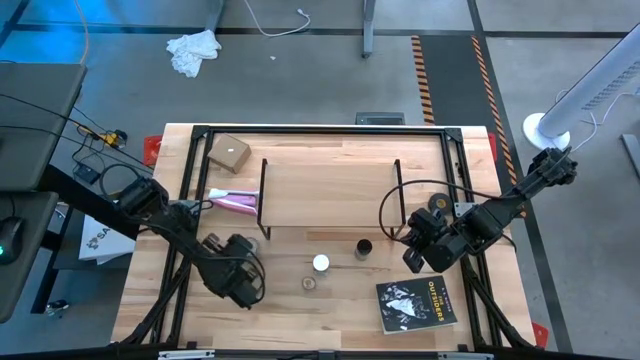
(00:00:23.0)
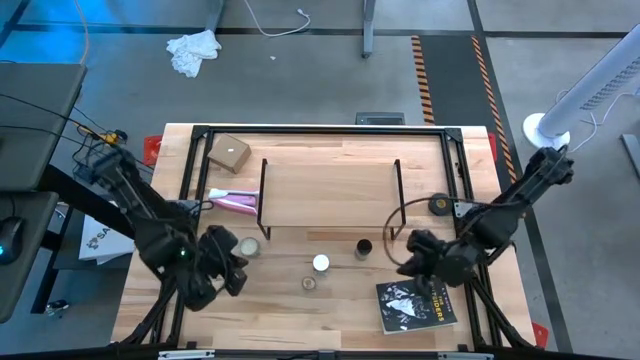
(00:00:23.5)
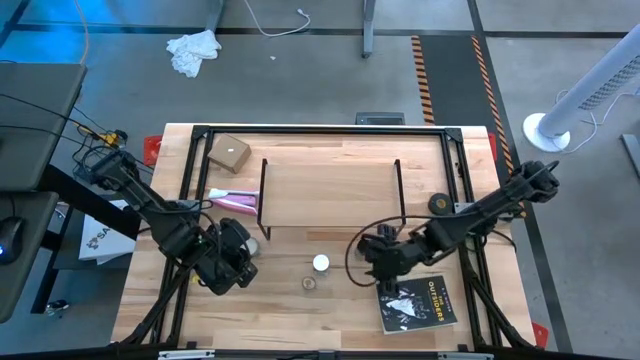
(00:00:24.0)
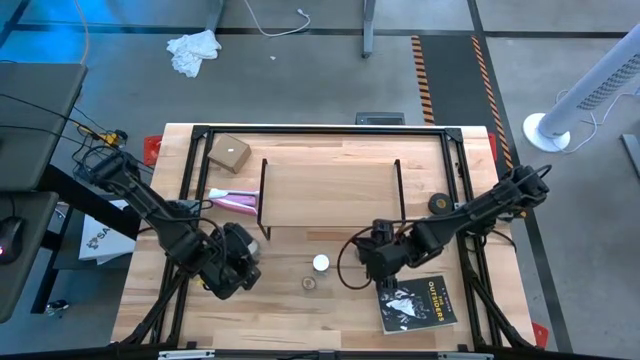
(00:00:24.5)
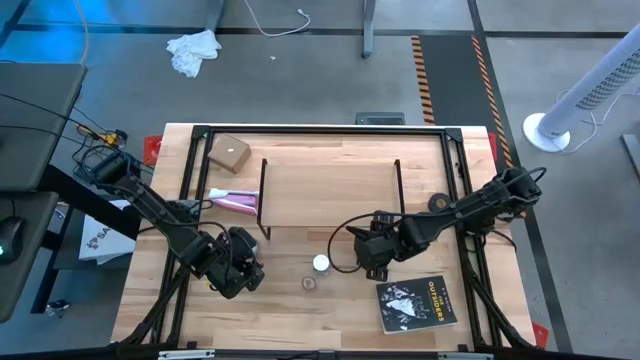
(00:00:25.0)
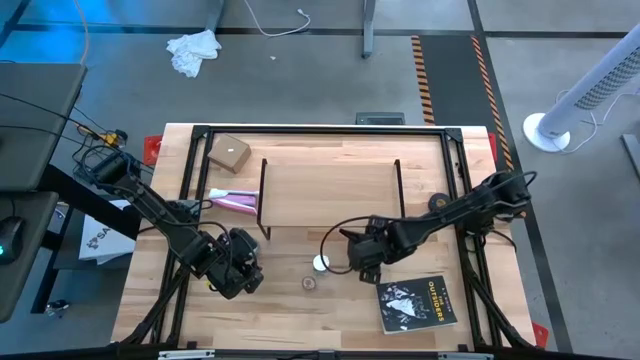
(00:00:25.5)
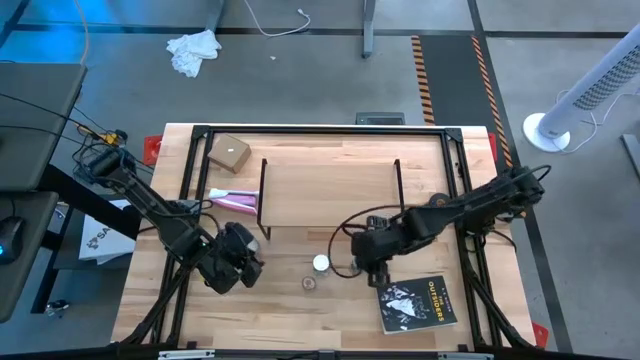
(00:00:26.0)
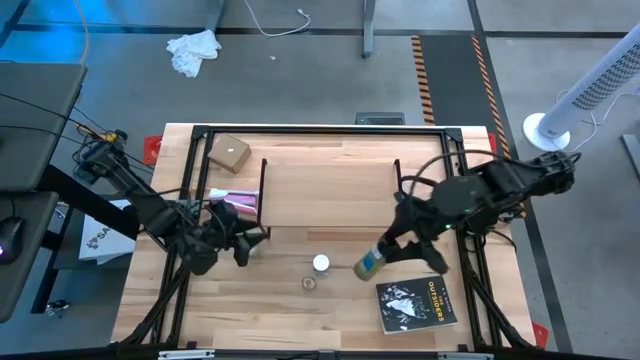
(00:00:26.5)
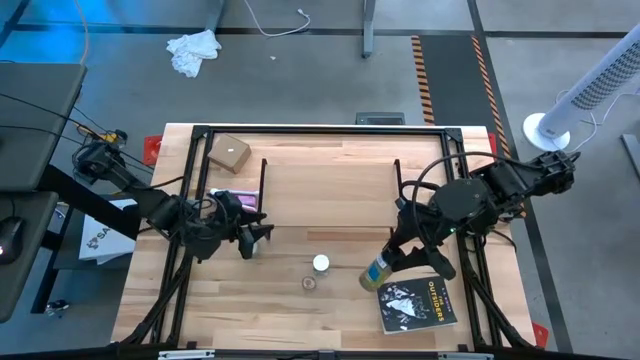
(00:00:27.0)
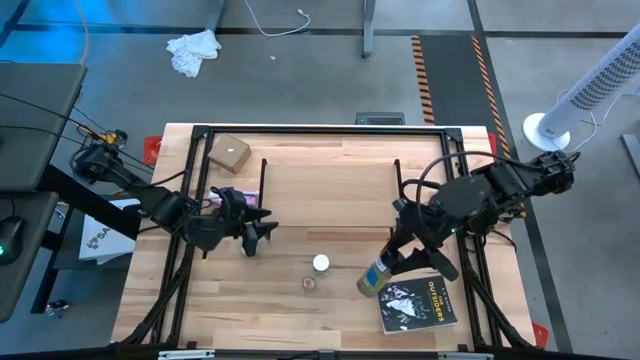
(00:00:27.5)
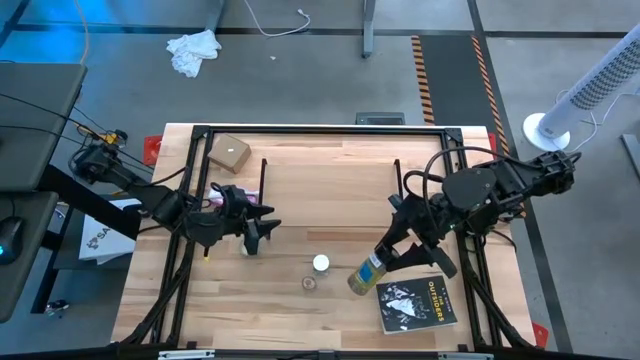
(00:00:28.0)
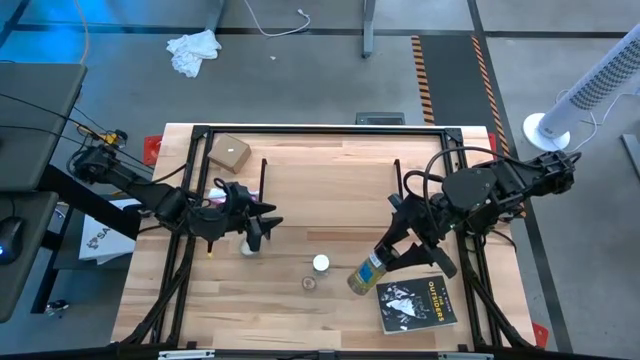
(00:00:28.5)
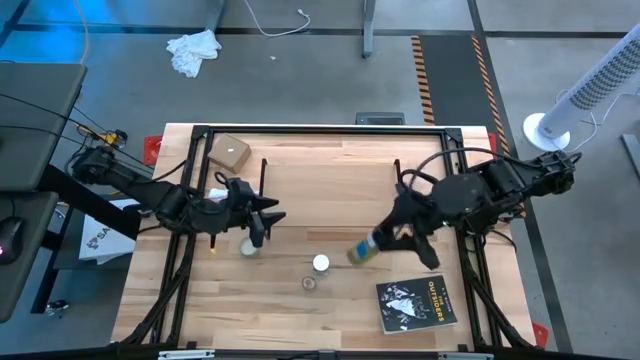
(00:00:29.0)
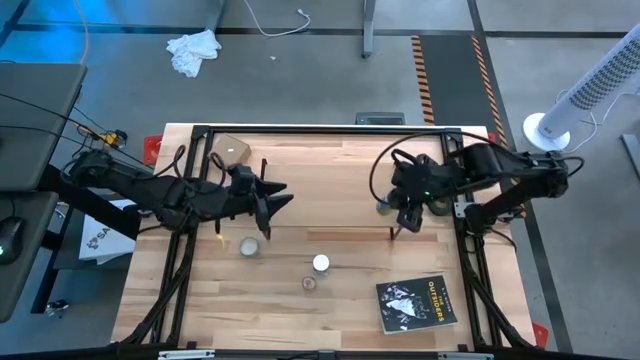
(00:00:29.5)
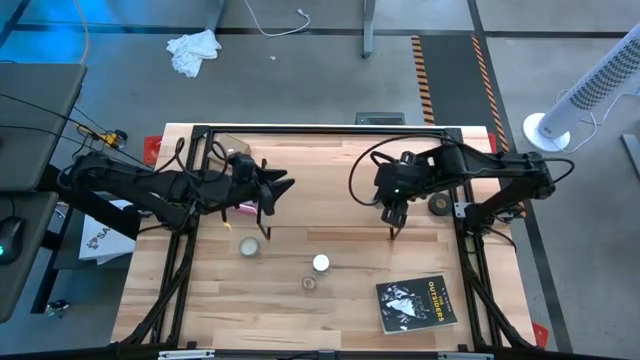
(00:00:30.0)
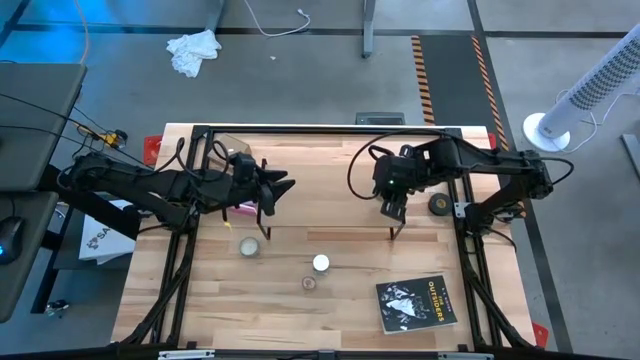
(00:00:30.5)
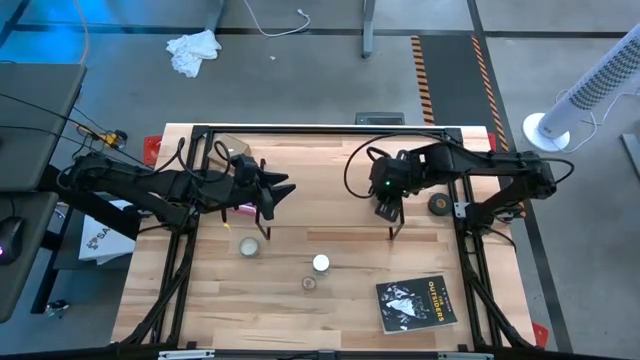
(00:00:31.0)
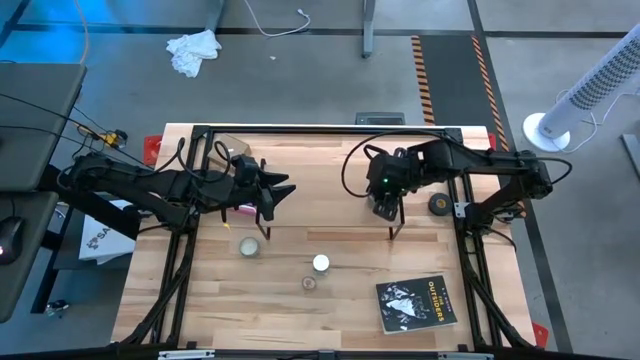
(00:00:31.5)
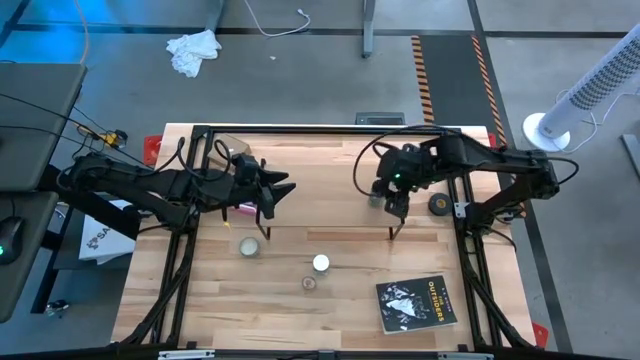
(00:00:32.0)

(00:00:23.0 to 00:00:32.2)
Task: Shelf spices
Put the light green seasoning bottle on the shelf

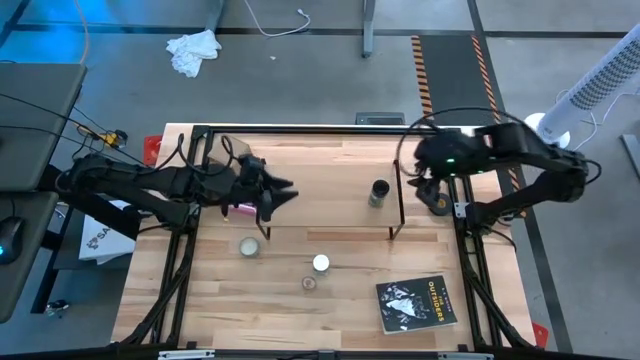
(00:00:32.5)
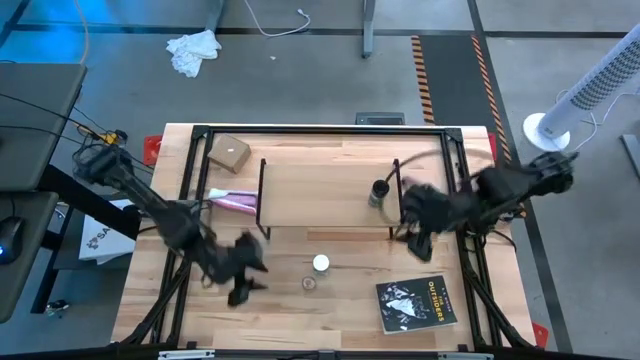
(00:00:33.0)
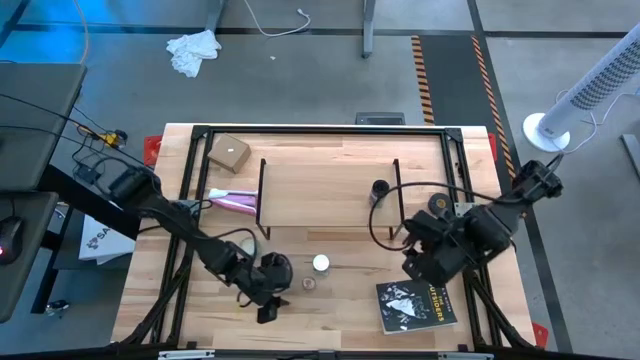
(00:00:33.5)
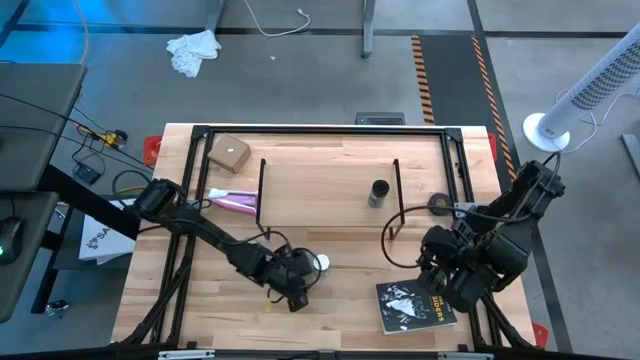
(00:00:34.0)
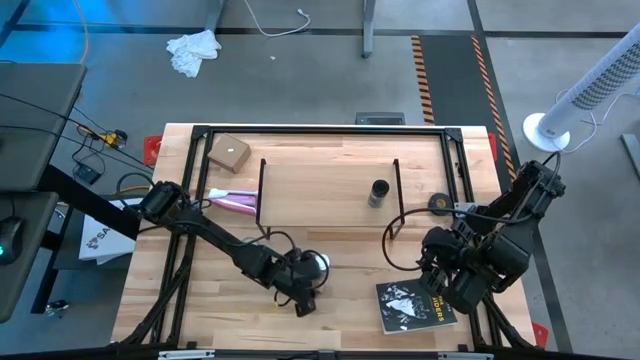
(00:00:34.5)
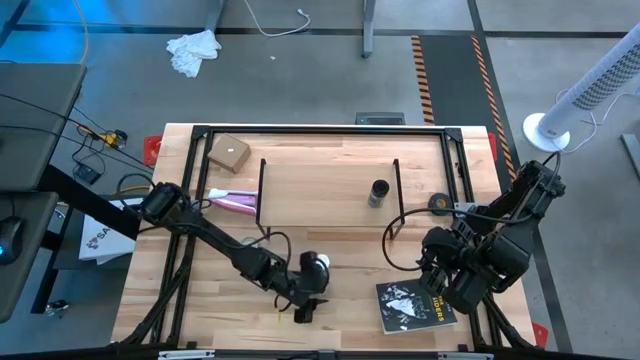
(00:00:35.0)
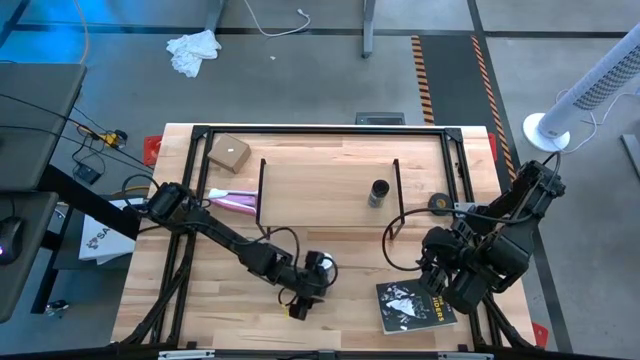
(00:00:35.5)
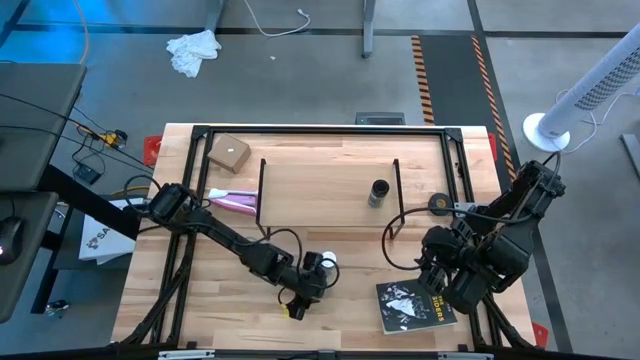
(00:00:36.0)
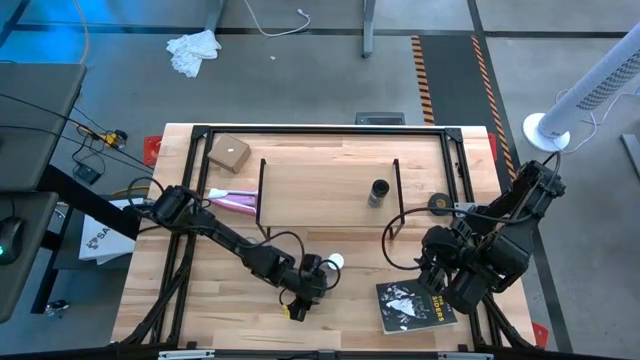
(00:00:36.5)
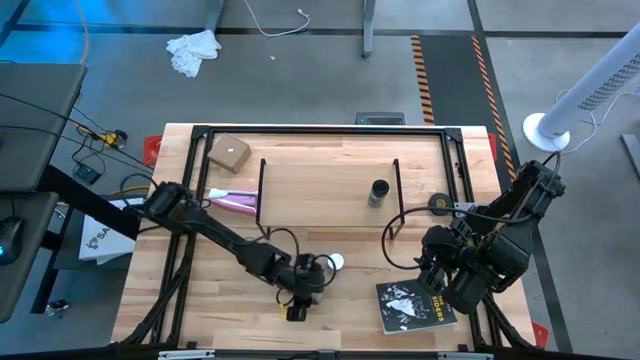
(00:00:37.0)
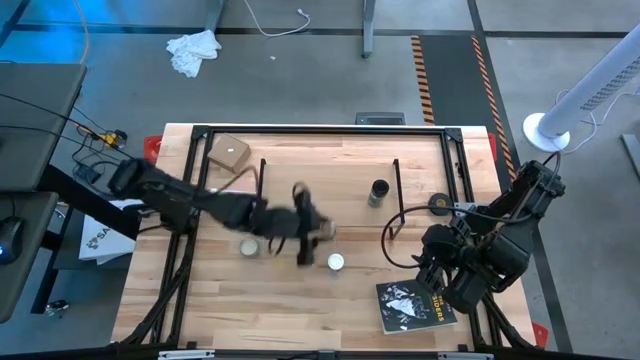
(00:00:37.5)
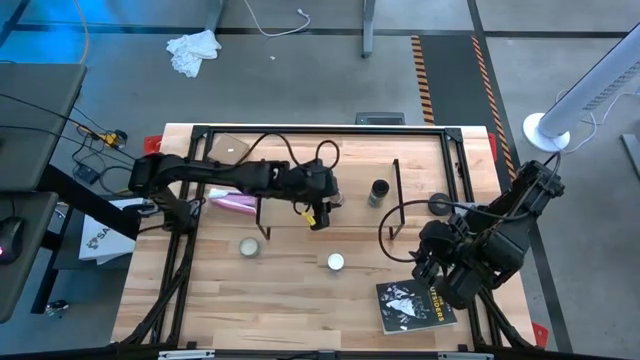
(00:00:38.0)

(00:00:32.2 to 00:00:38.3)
Put the brown seasoning bottle on the shelf

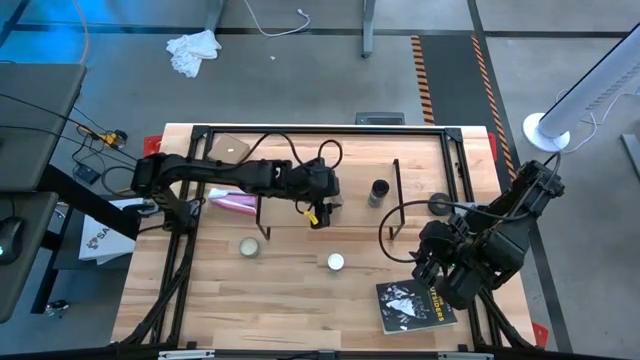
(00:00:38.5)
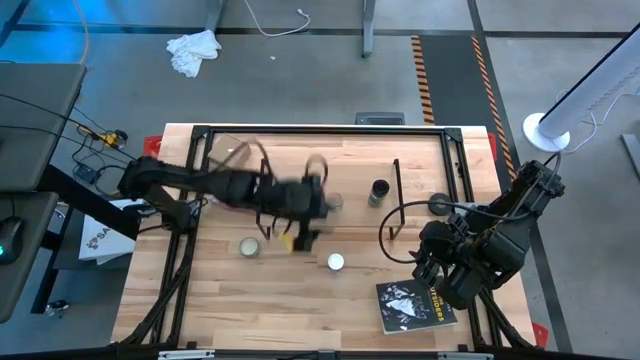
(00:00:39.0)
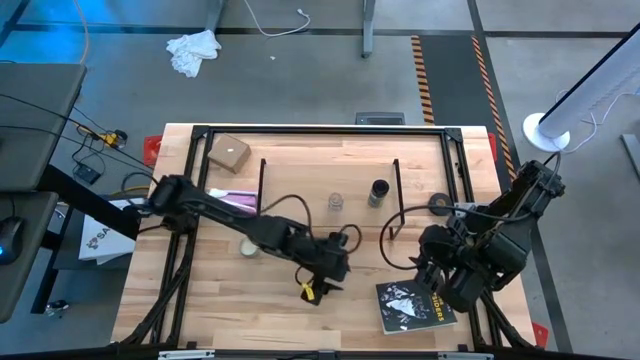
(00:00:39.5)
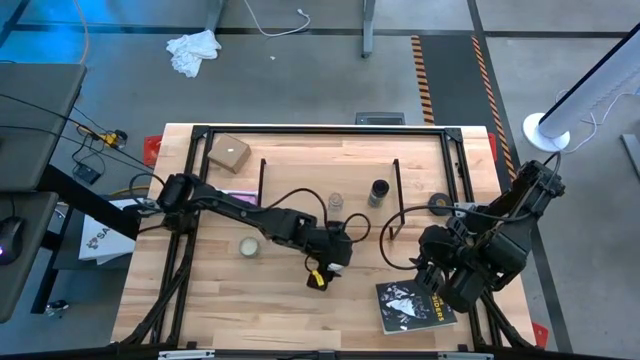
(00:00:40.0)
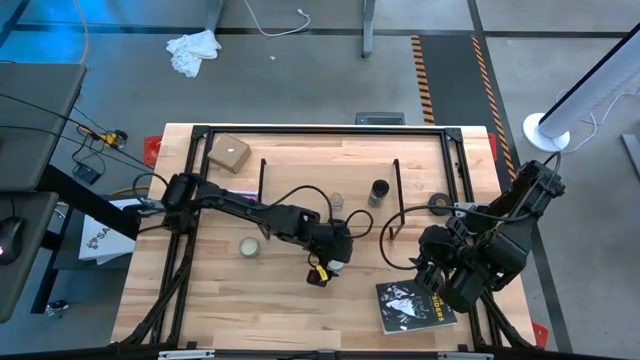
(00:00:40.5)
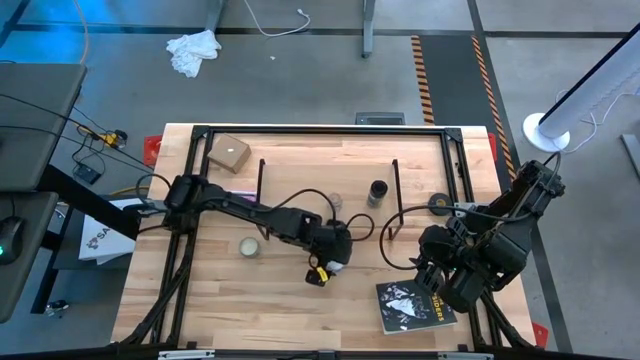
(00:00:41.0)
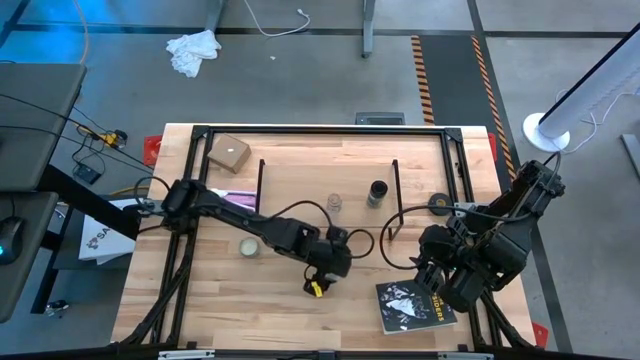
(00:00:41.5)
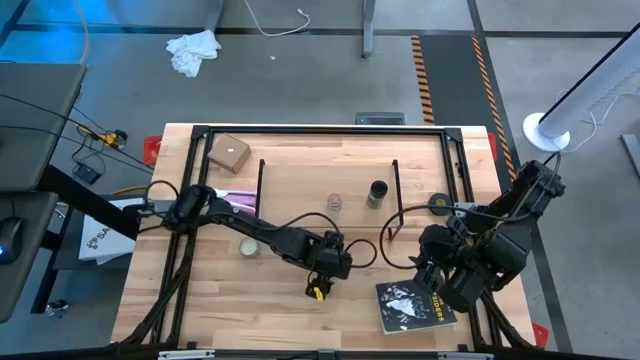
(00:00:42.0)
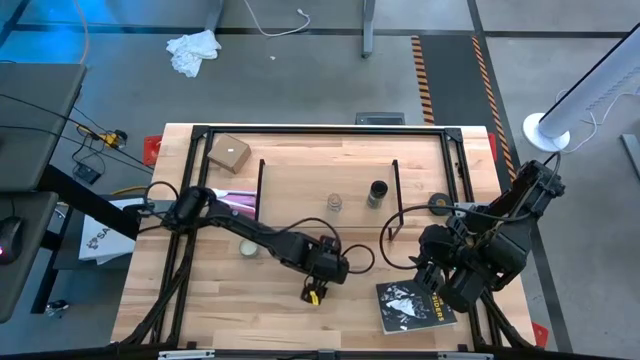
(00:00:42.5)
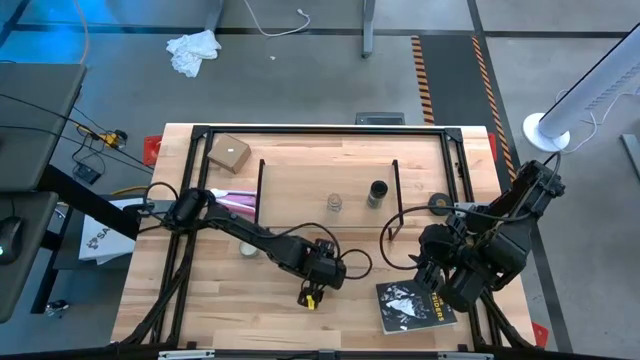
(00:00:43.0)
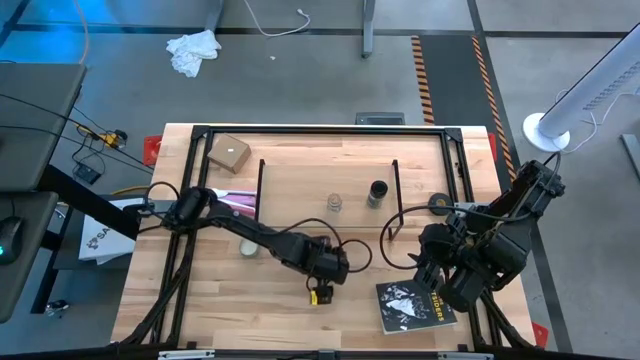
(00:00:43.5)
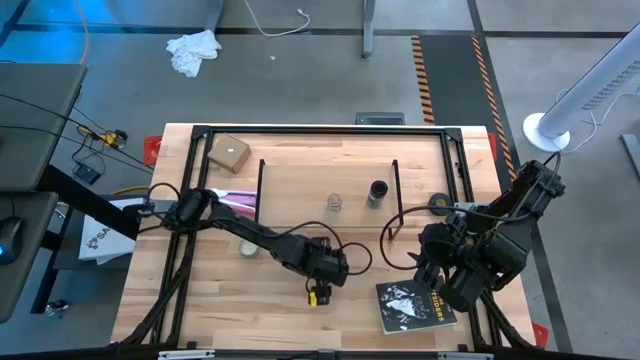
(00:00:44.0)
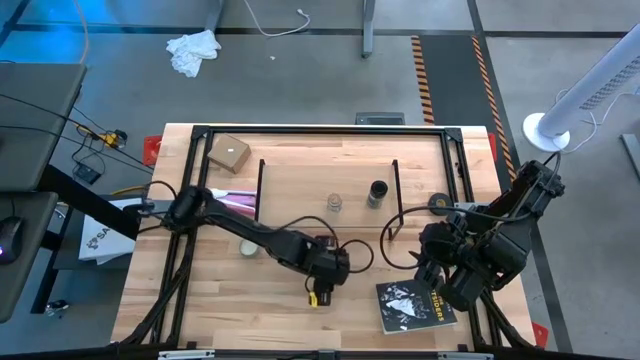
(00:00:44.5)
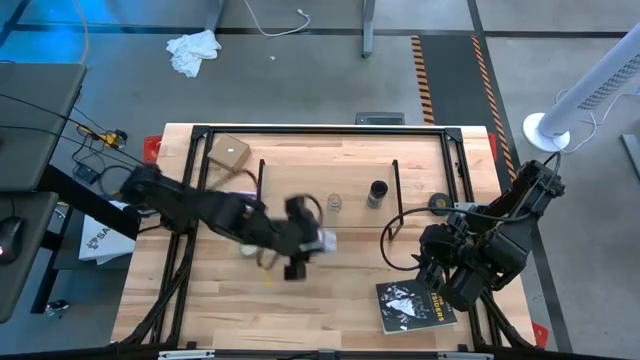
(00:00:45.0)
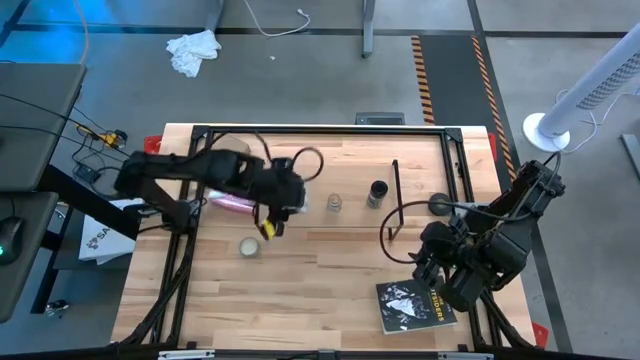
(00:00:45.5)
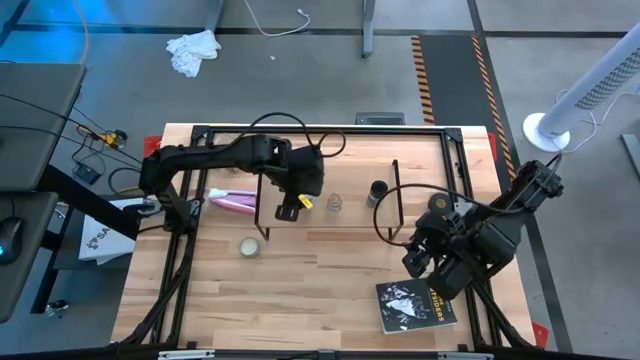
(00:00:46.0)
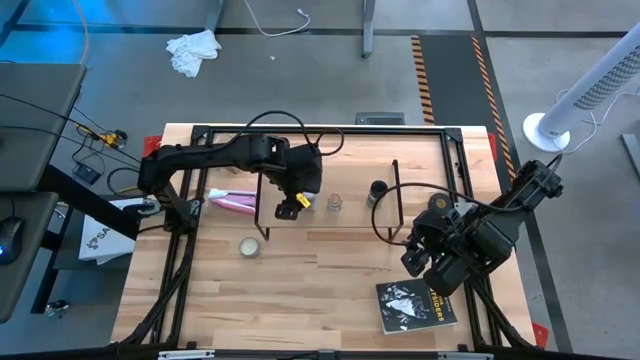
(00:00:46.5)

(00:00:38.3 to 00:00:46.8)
Put the white seasoning bottle on the shelf
